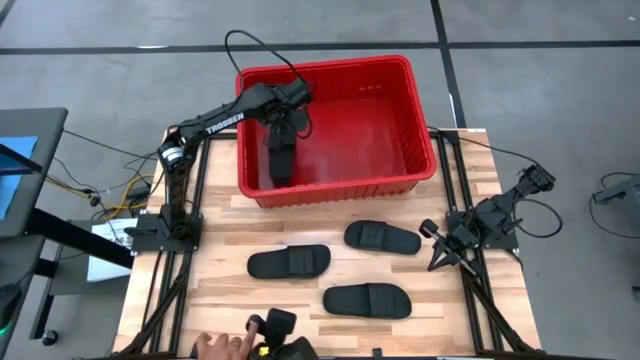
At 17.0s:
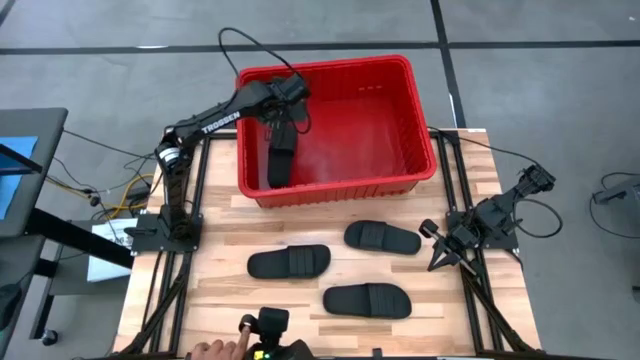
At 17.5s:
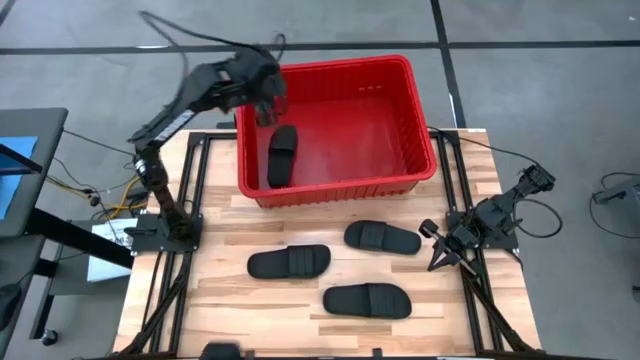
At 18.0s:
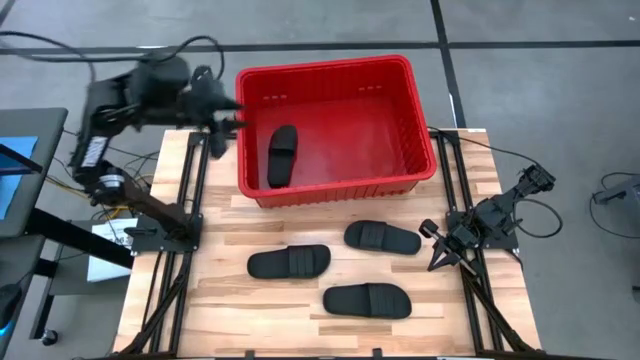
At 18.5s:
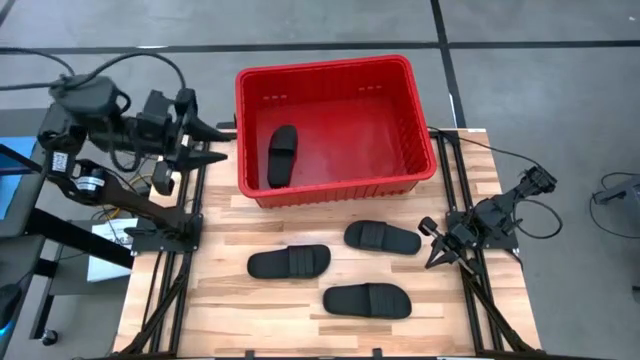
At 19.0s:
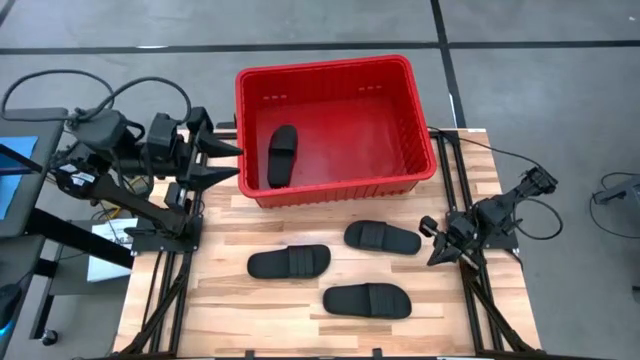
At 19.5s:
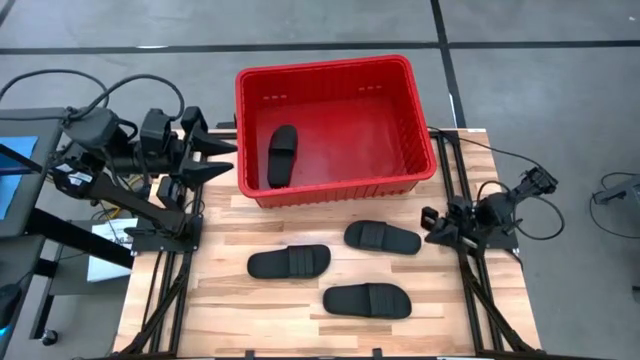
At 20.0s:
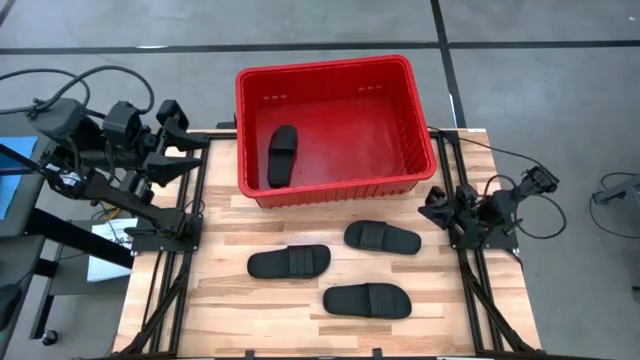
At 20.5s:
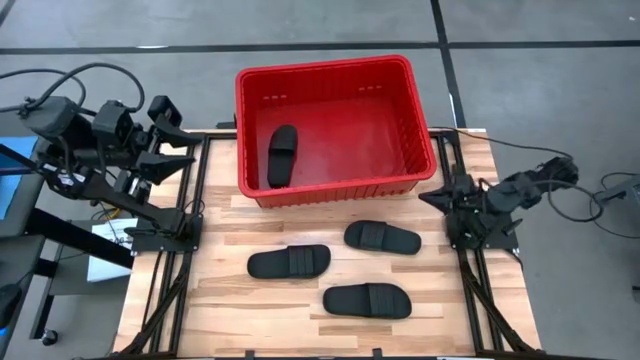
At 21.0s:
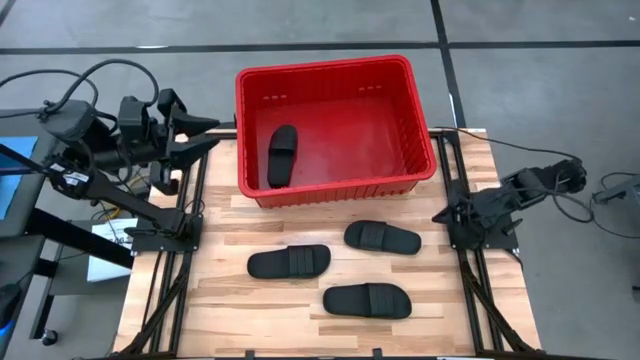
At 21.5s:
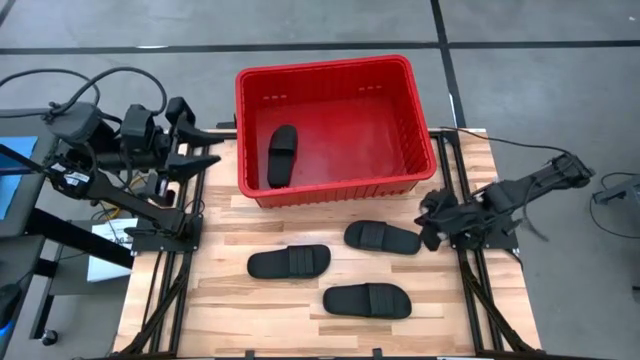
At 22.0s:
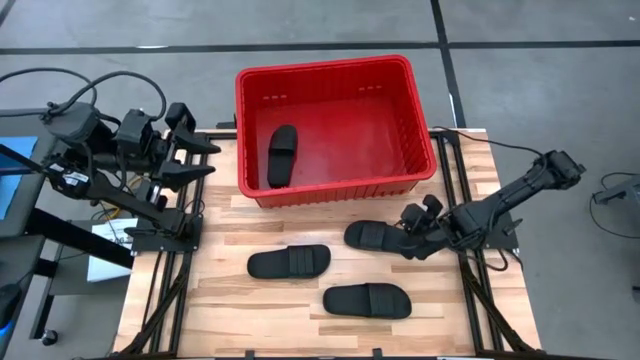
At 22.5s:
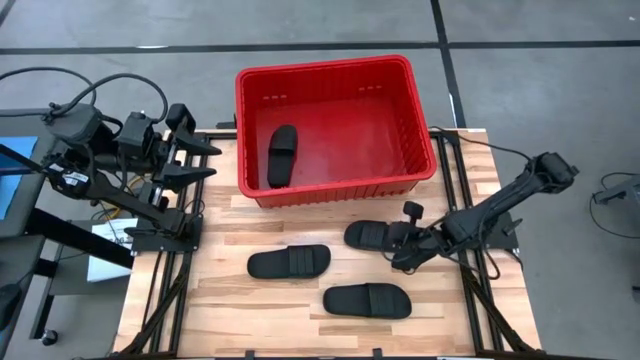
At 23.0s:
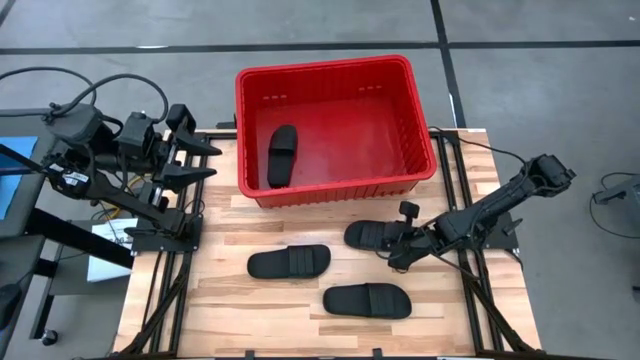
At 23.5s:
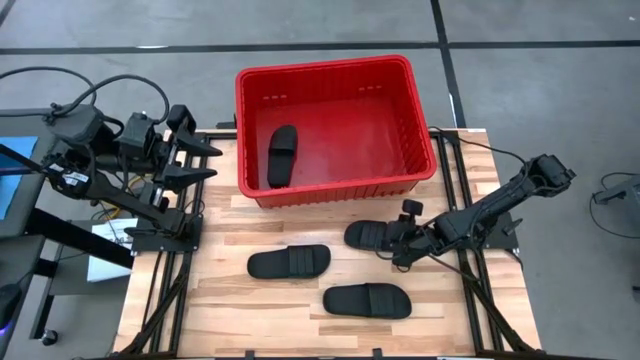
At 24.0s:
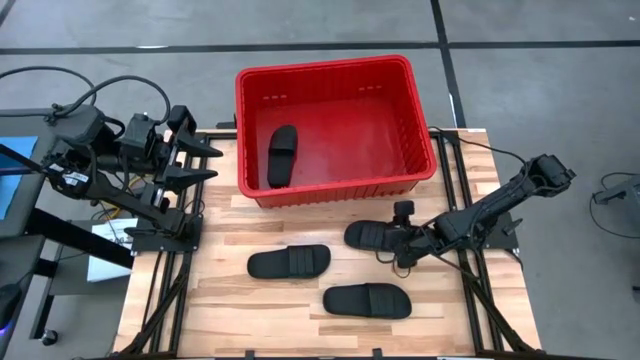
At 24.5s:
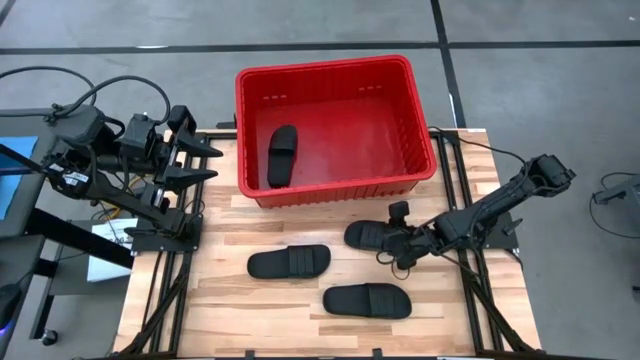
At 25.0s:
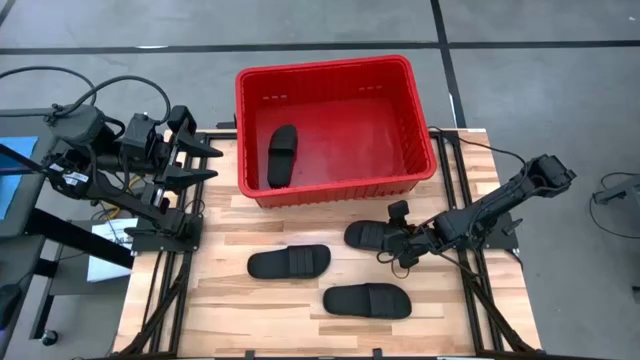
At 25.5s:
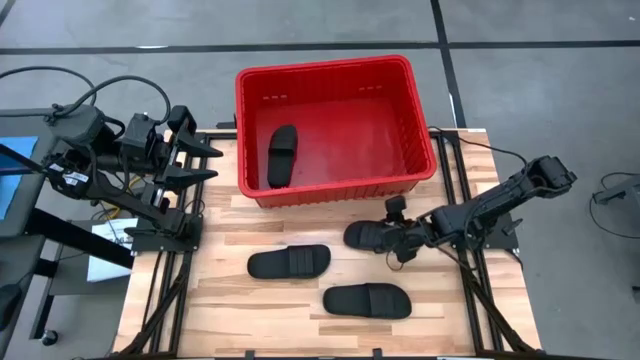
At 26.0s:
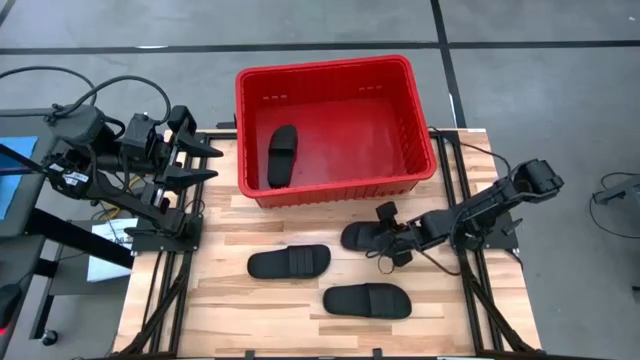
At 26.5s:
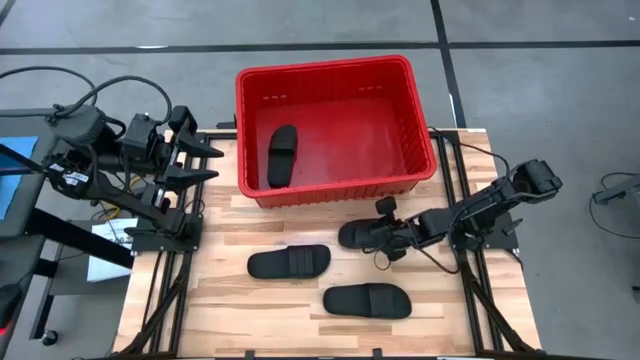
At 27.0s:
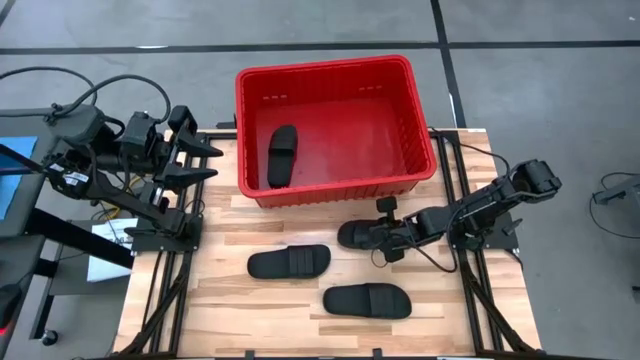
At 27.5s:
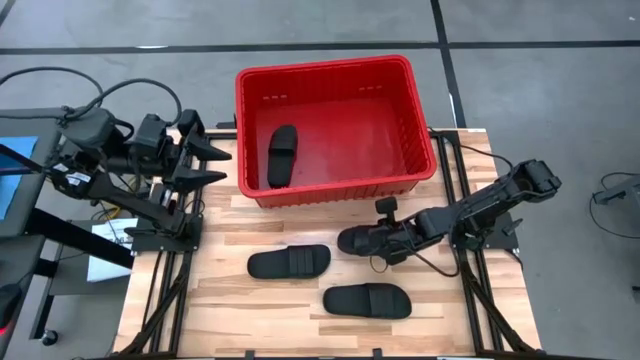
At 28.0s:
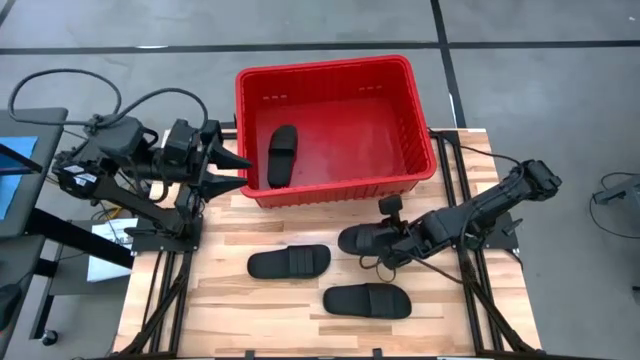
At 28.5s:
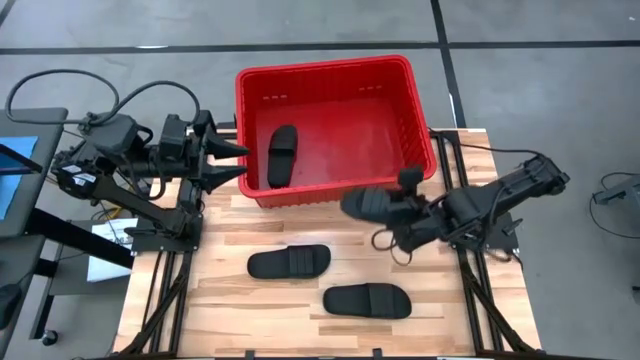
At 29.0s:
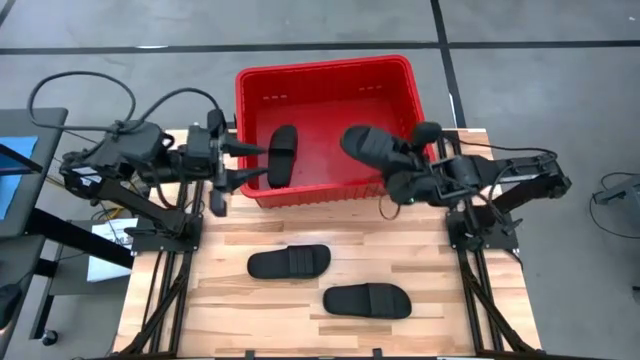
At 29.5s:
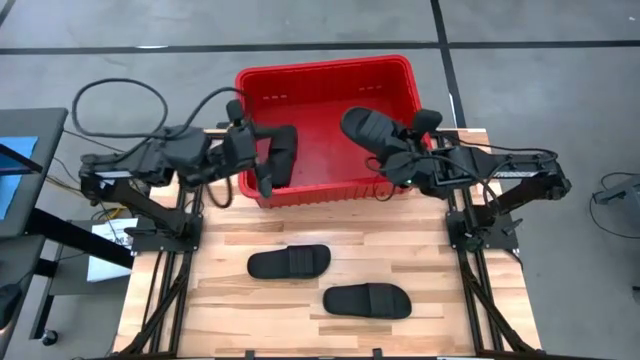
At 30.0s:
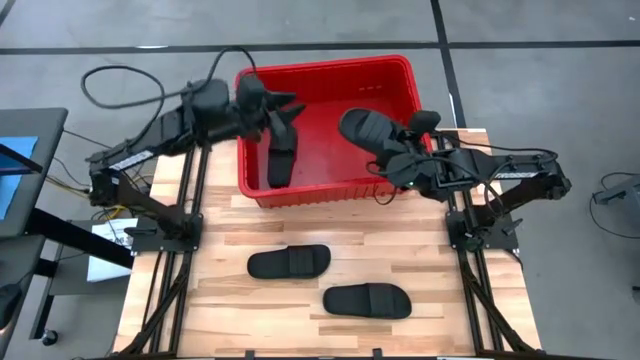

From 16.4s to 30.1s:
Task: Pick and place slides into bin
Put the top right black slide into the red bin

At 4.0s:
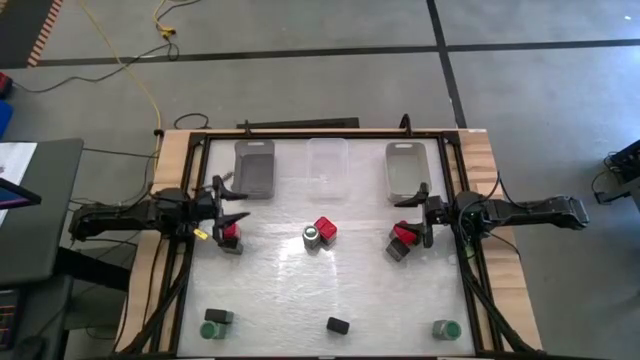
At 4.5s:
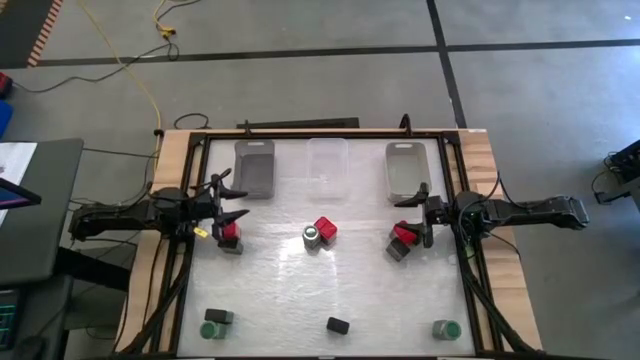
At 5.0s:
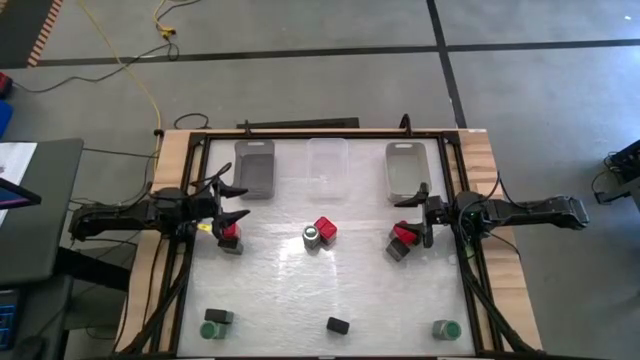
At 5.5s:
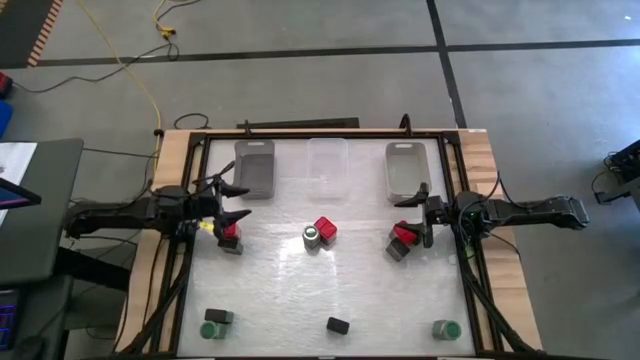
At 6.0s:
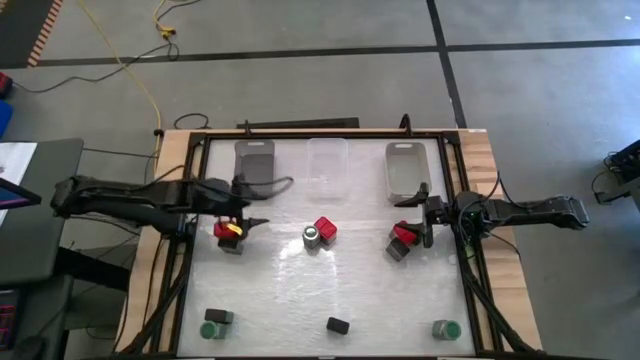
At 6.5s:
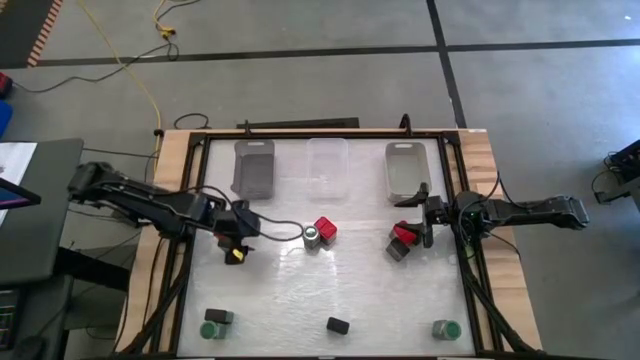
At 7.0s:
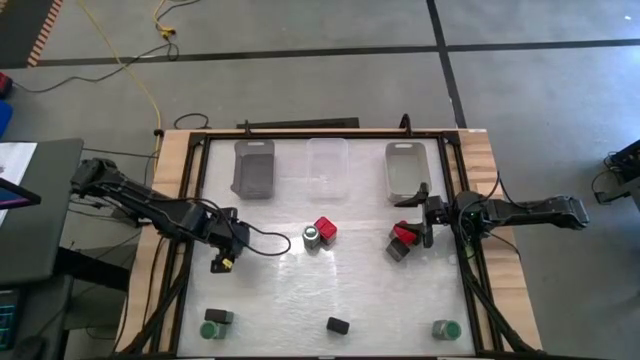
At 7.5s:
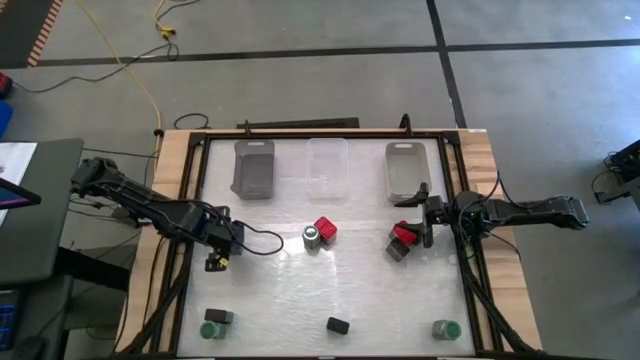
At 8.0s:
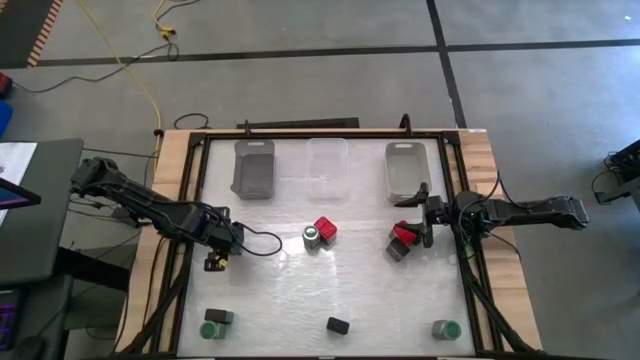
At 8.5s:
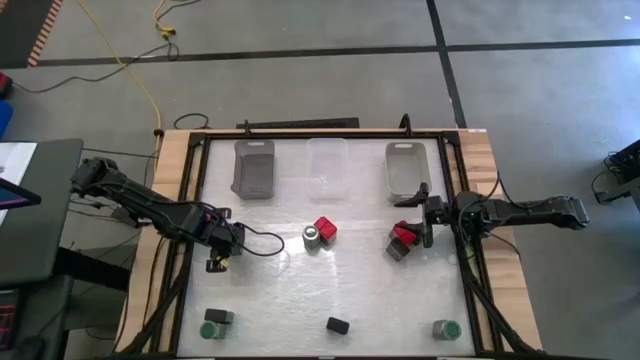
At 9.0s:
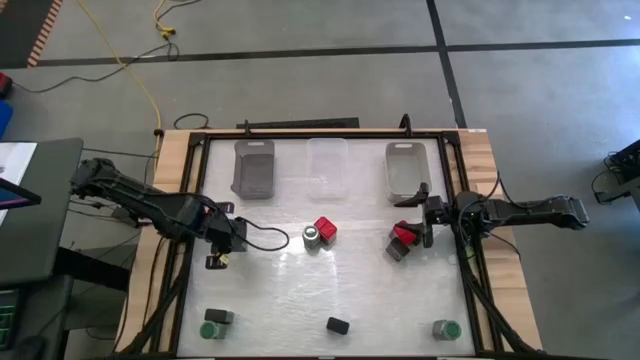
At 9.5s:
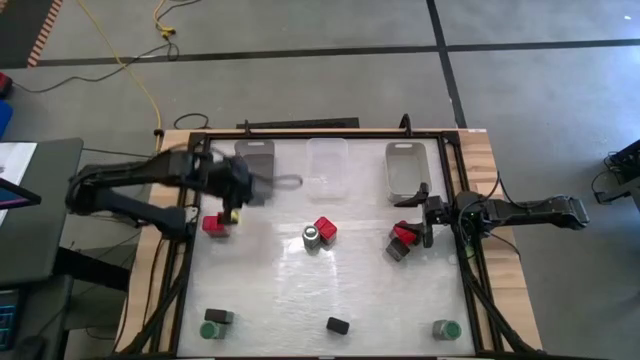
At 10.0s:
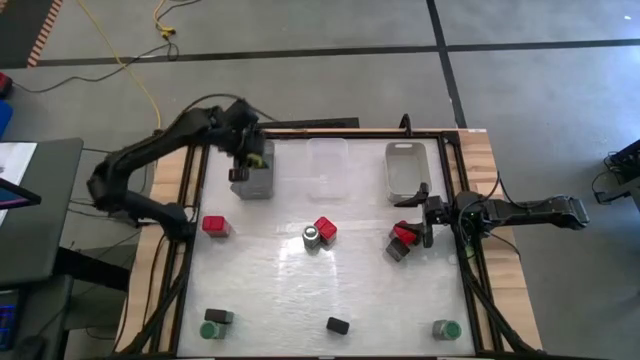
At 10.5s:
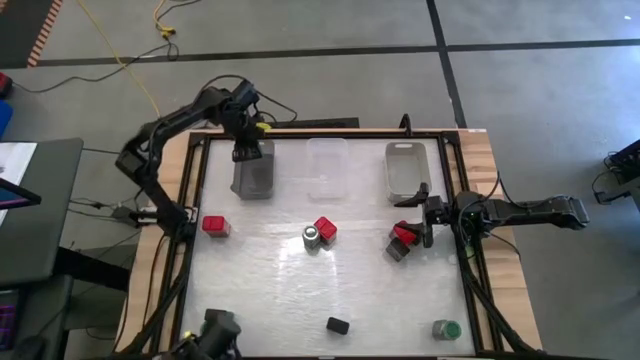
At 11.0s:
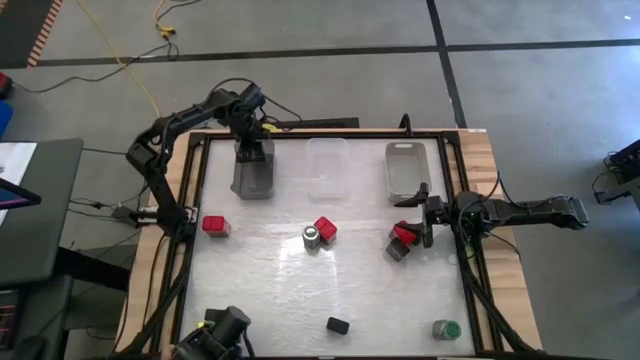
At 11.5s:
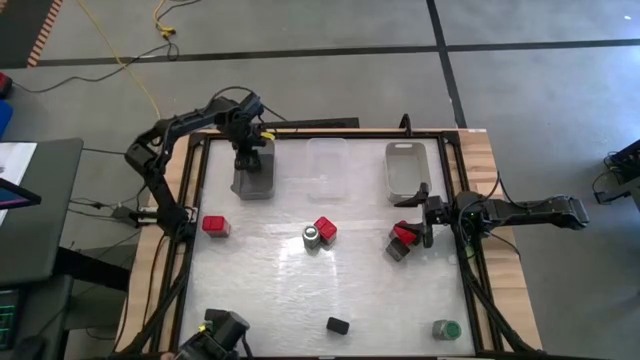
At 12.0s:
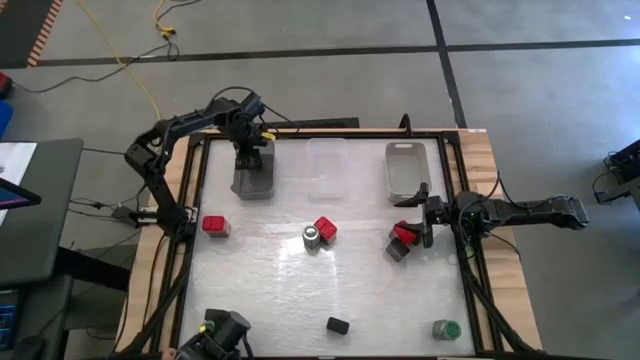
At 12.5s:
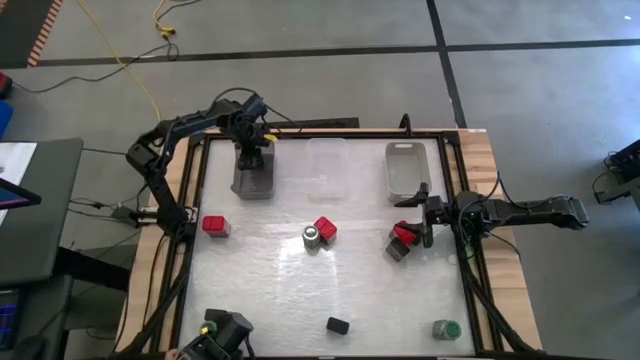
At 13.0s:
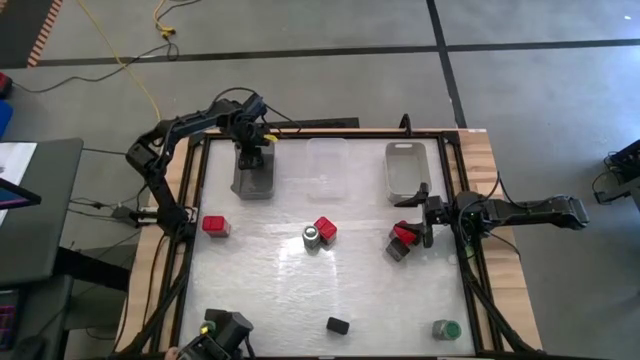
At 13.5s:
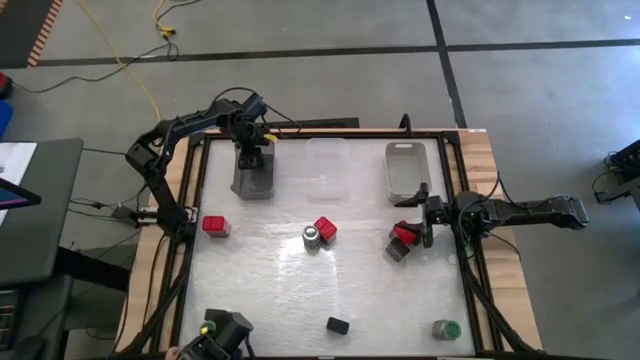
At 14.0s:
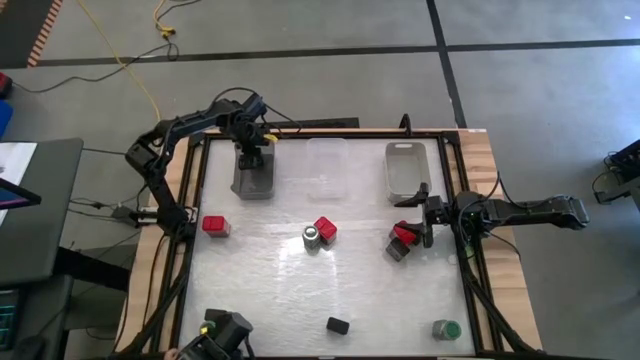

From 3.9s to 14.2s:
Task: Sort spices by type
Put the black seasoning can into the black bin
